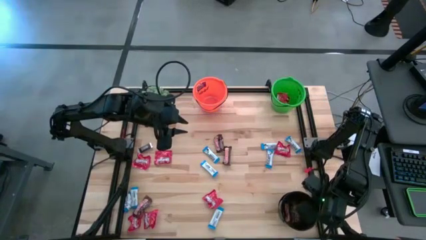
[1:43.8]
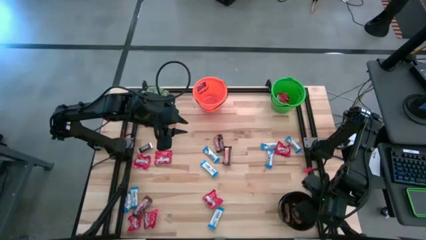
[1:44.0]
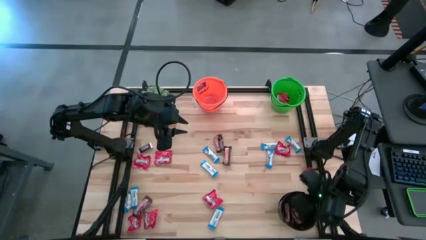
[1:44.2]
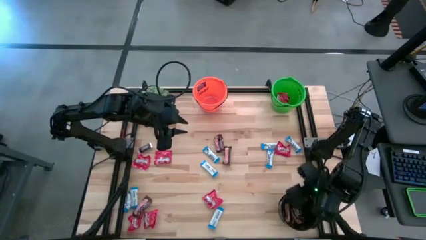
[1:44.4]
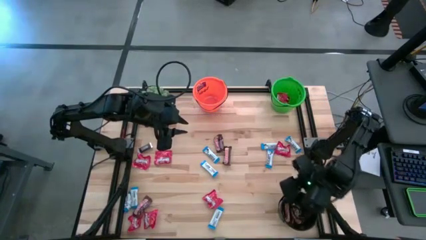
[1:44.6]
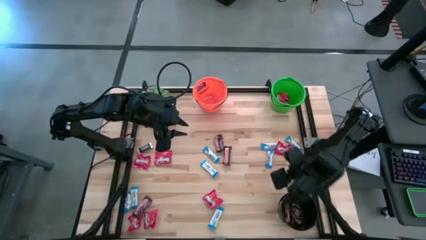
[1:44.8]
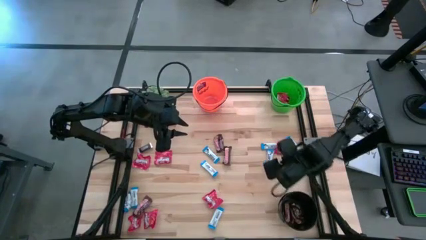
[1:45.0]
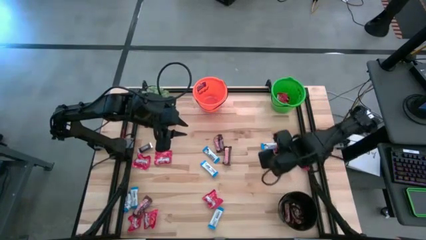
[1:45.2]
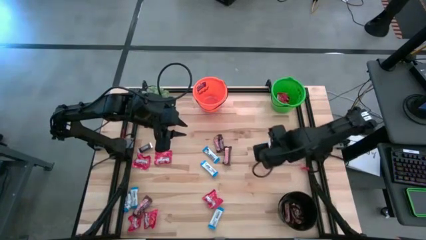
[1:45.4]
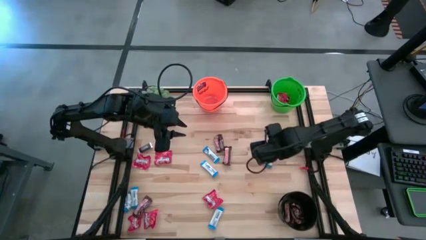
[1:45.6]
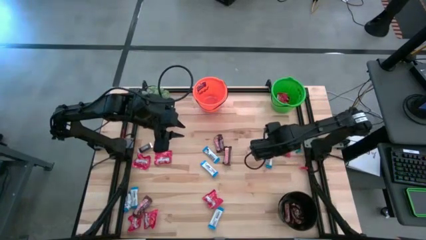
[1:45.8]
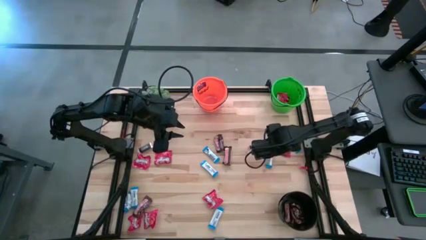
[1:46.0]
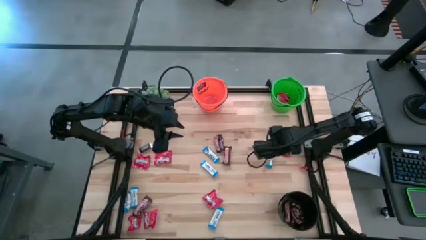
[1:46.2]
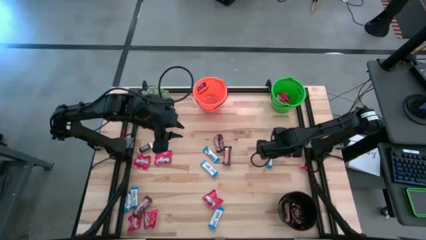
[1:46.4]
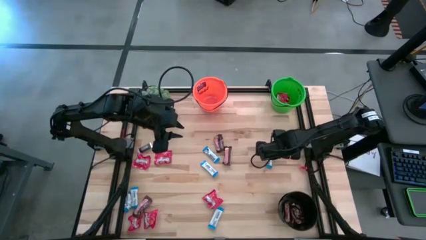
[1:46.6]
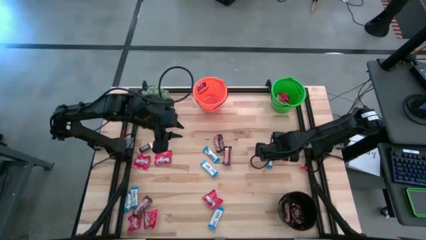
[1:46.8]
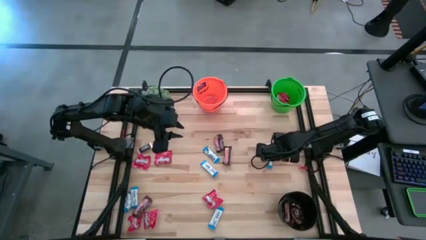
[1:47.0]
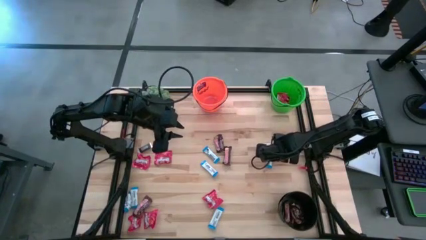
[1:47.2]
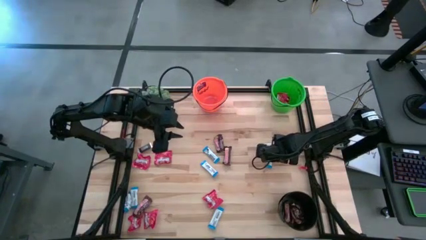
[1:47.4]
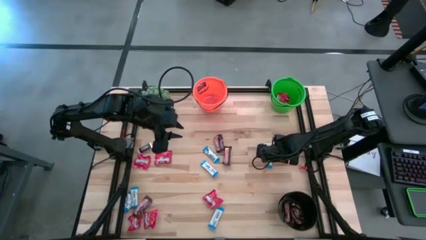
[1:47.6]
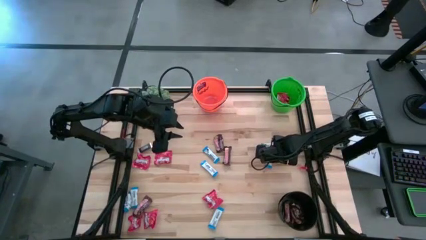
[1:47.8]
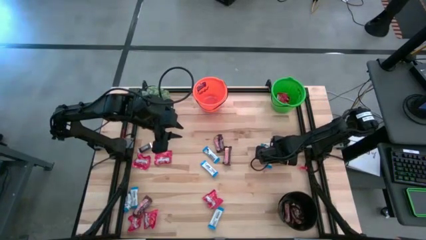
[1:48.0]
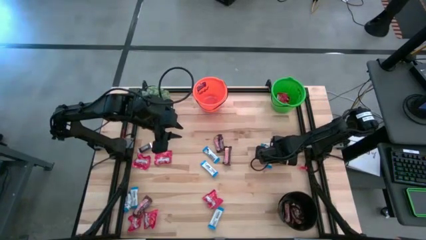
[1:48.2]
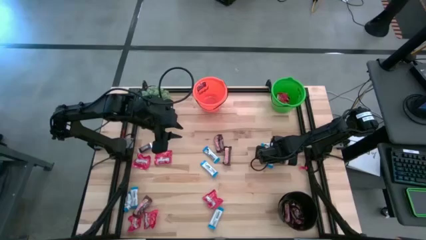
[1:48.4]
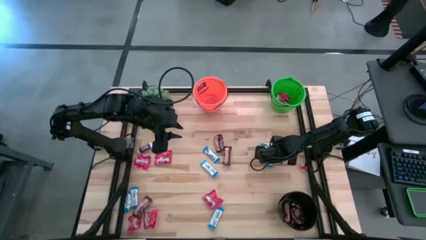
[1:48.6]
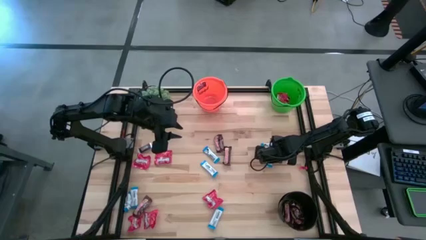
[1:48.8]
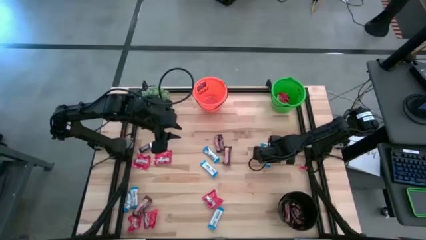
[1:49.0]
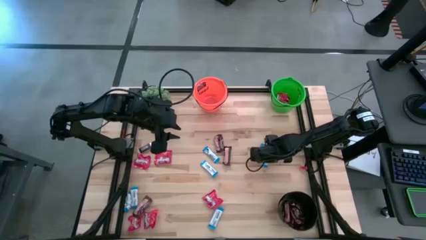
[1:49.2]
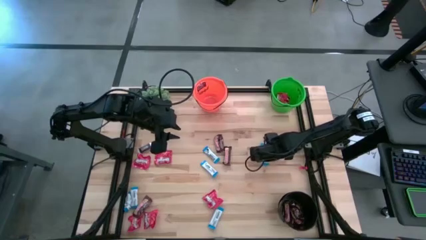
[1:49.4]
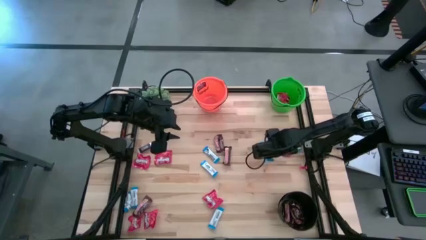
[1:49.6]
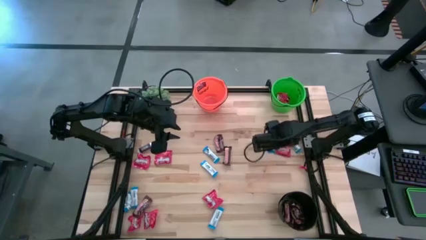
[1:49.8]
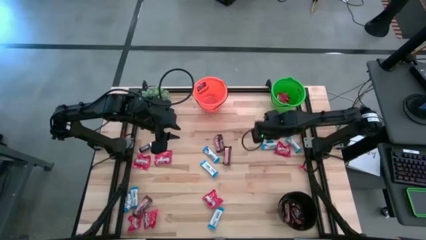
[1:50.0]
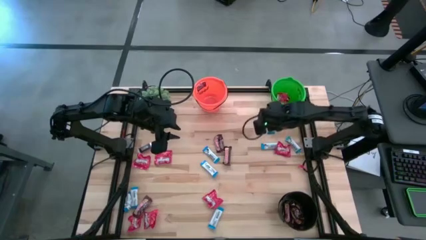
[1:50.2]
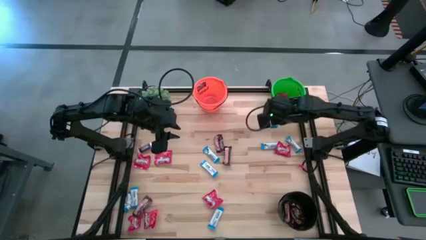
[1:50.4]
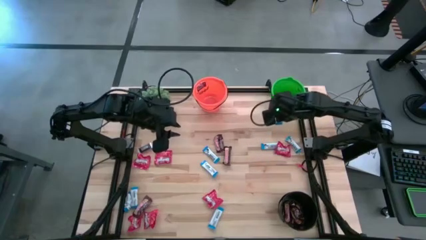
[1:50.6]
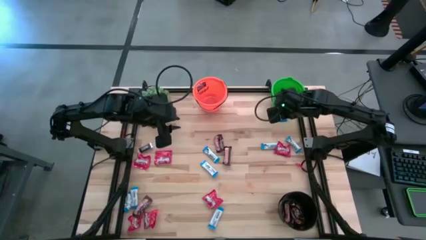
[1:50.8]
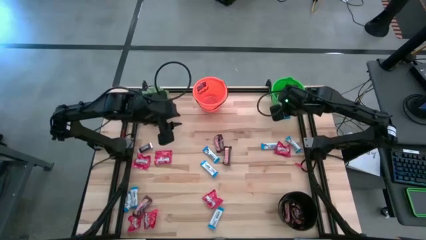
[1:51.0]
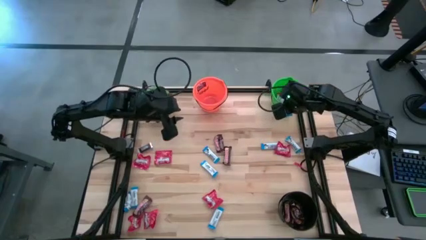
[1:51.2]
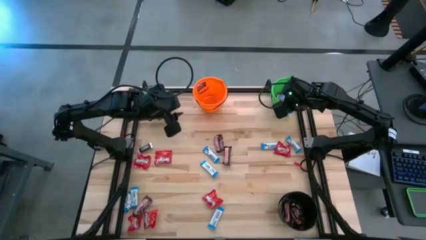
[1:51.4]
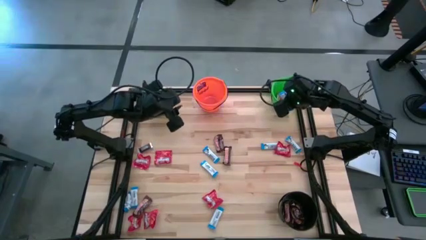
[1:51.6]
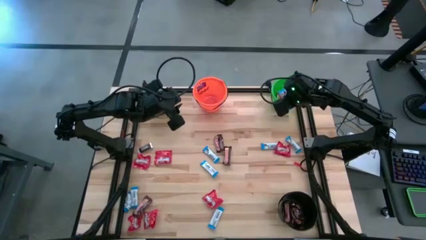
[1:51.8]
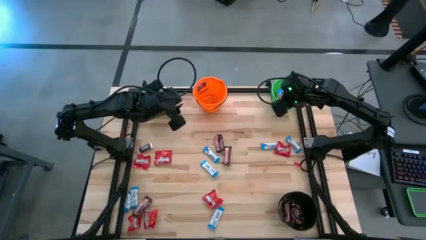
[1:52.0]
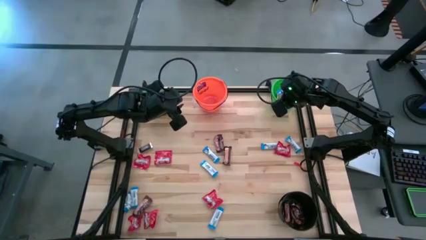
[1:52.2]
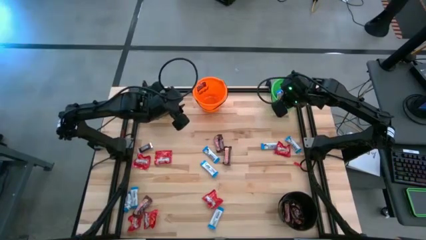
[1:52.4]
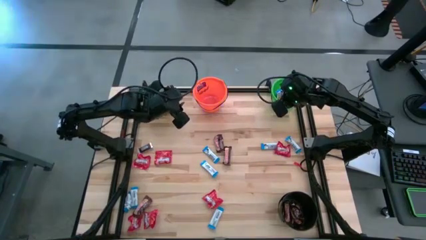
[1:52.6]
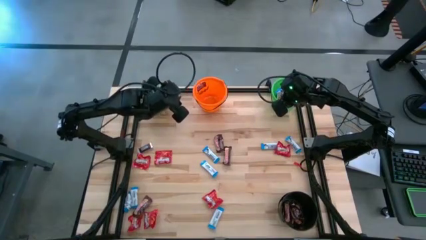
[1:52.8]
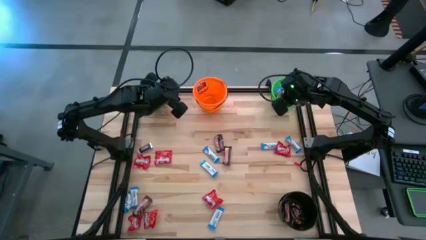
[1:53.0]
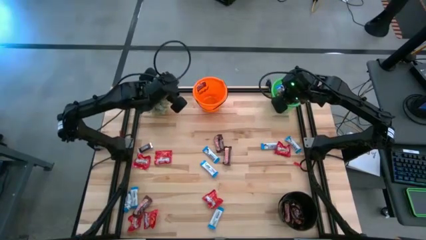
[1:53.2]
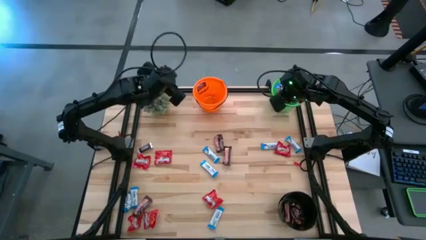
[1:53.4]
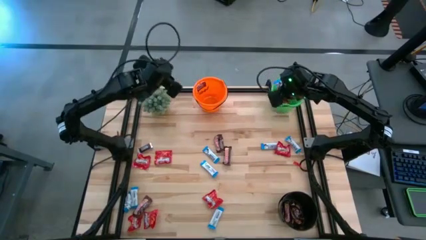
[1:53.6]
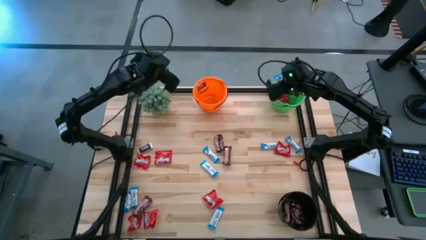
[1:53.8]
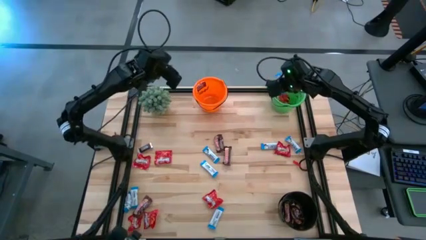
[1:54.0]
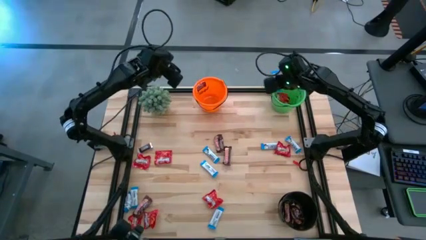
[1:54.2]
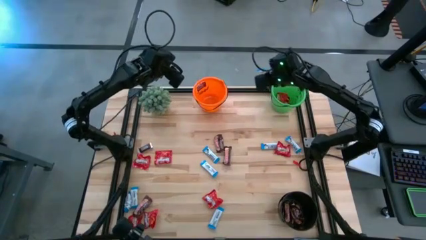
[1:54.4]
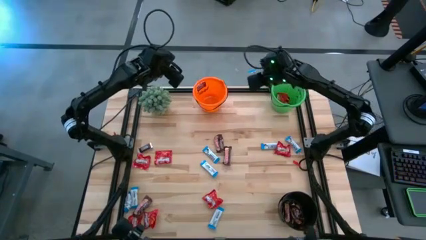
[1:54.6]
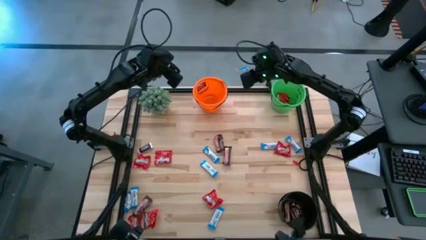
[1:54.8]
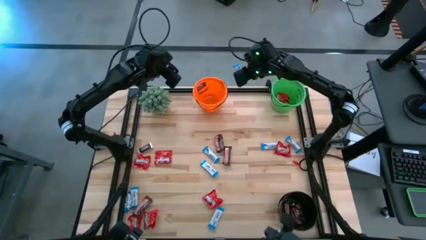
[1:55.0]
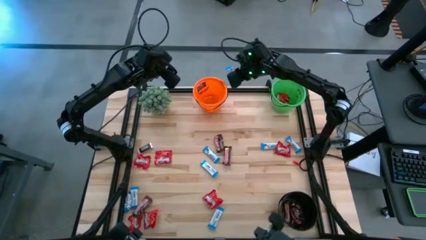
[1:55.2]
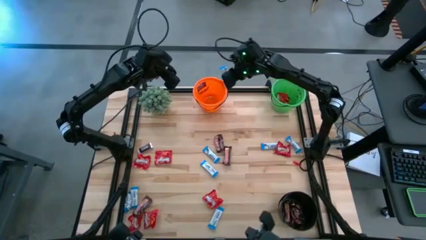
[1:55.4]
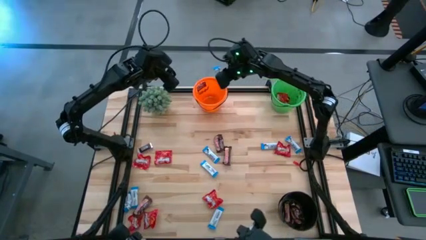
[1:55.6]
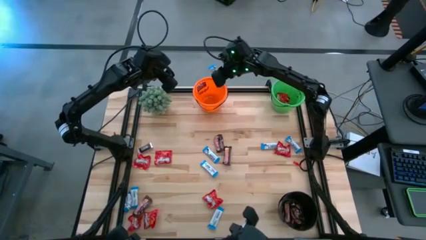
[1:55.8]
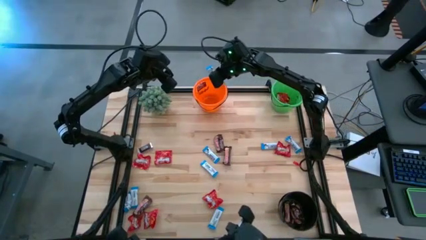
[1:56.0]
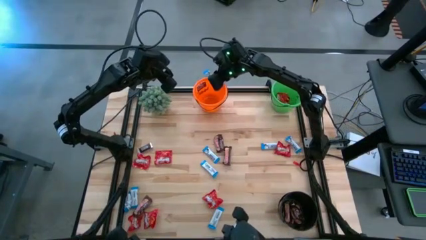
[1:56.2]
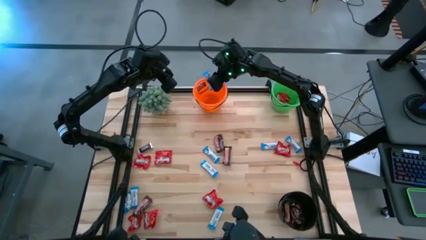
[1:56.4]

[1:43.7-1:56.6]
Task: Organize candy in baskets
Put the white chocolate bar into the orange bucket
